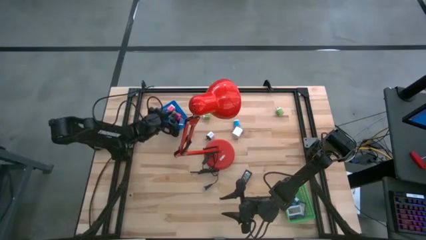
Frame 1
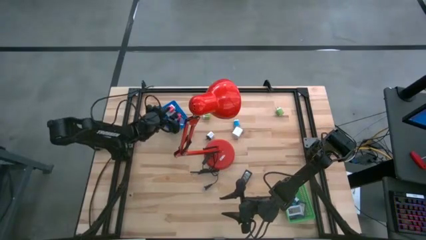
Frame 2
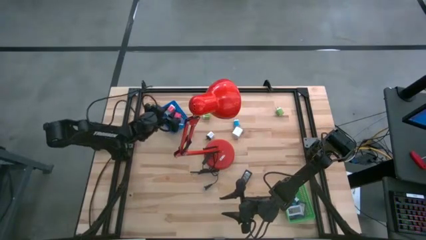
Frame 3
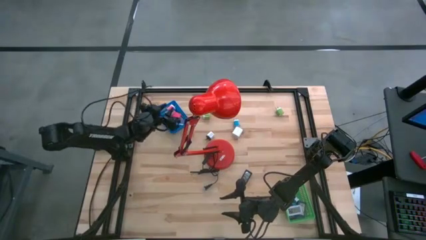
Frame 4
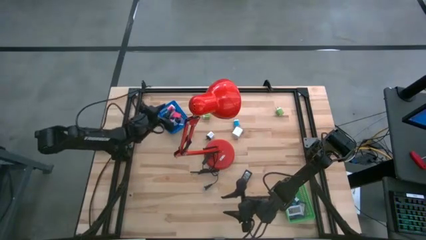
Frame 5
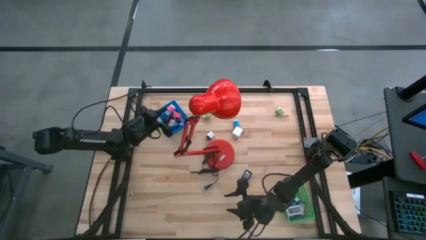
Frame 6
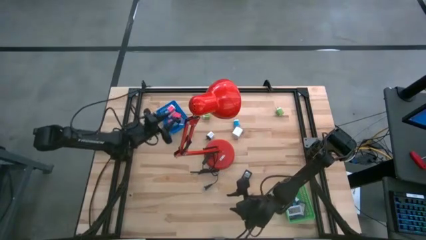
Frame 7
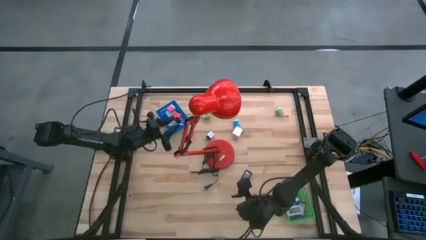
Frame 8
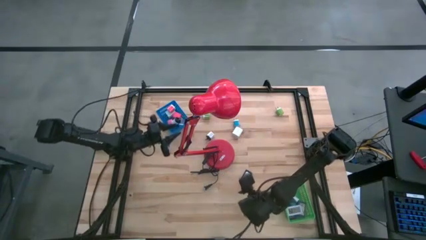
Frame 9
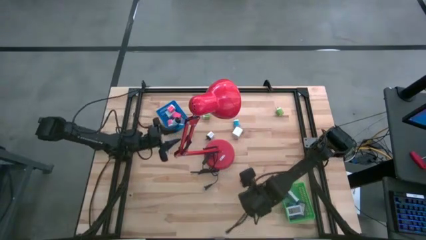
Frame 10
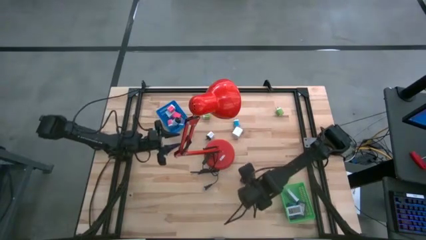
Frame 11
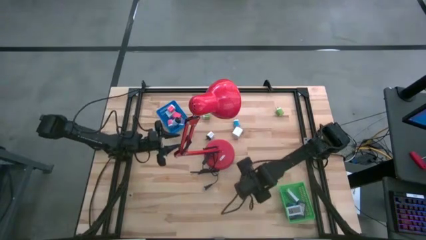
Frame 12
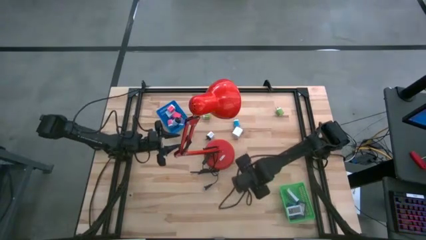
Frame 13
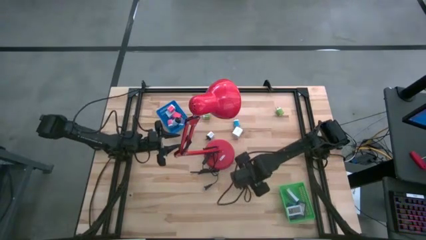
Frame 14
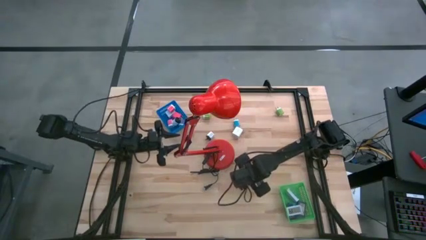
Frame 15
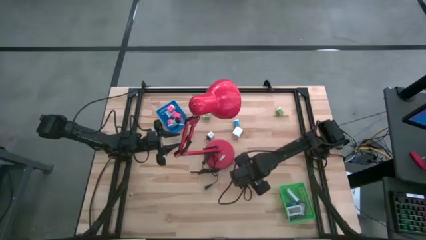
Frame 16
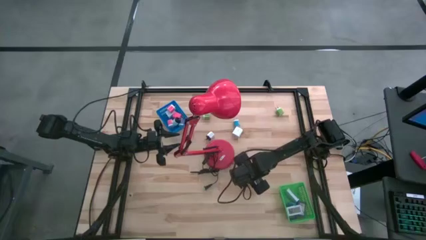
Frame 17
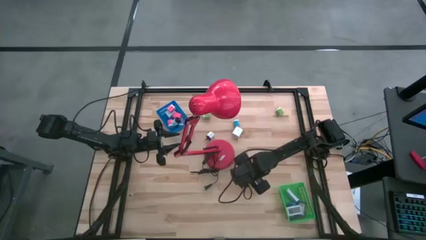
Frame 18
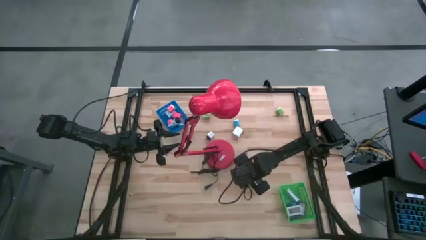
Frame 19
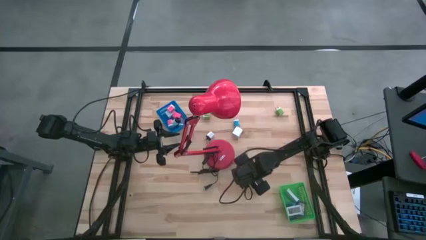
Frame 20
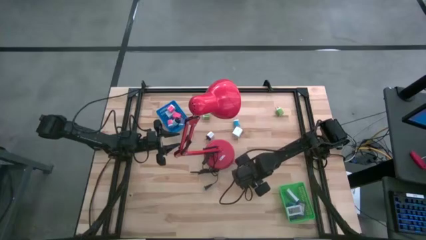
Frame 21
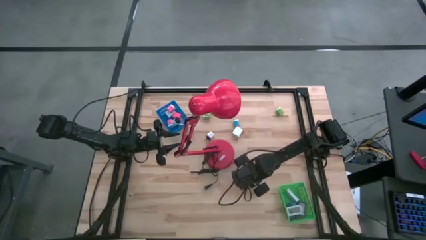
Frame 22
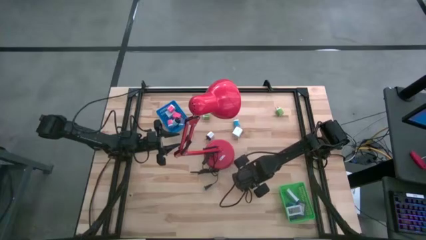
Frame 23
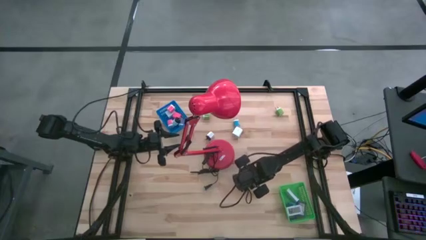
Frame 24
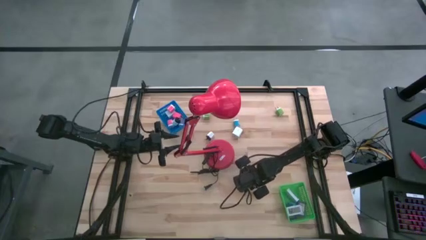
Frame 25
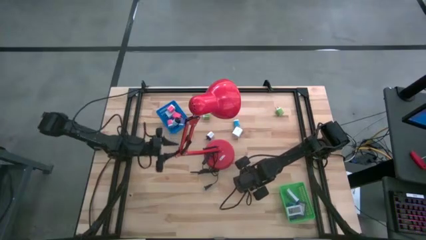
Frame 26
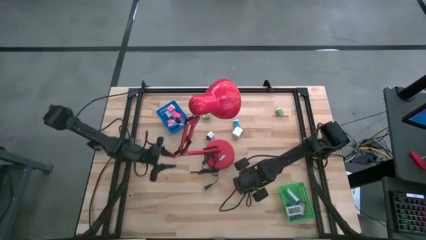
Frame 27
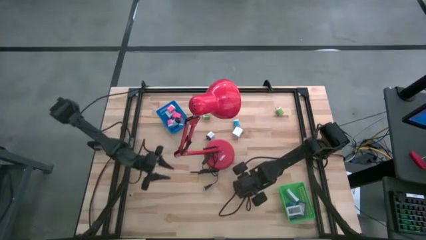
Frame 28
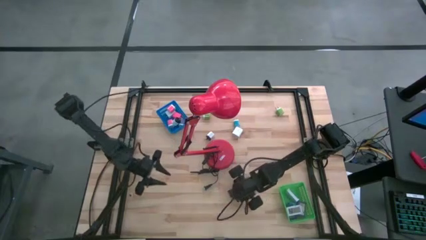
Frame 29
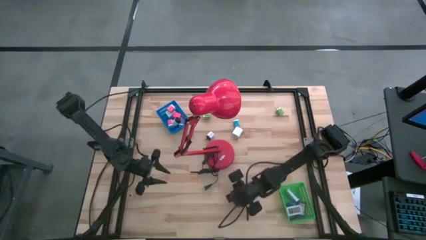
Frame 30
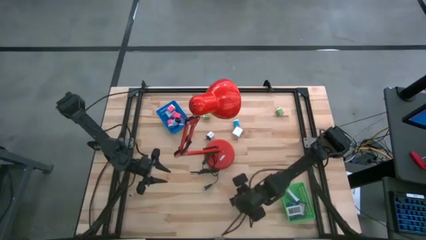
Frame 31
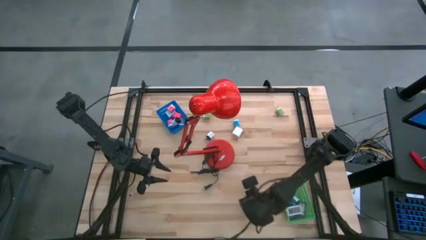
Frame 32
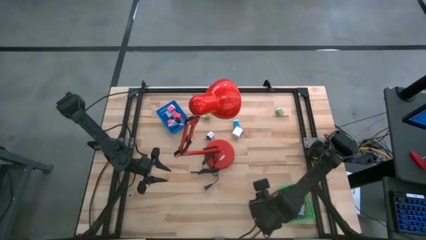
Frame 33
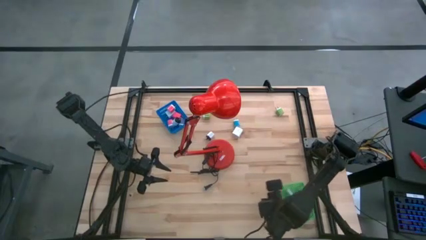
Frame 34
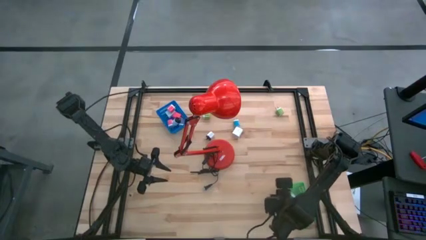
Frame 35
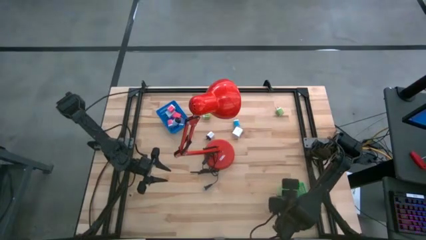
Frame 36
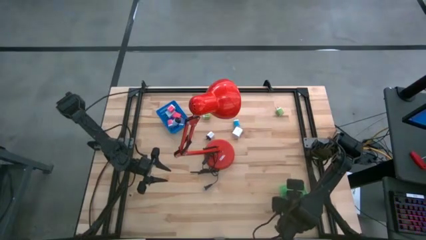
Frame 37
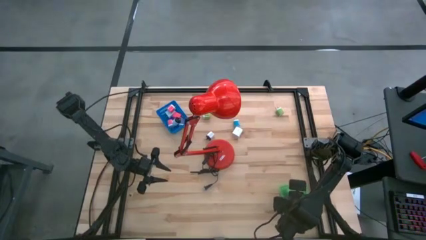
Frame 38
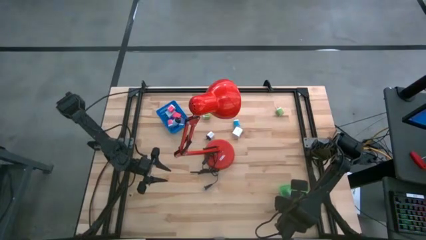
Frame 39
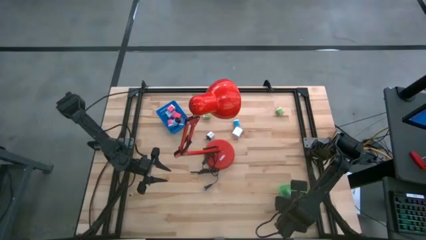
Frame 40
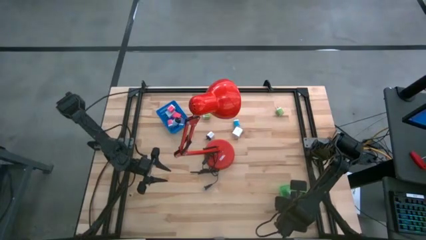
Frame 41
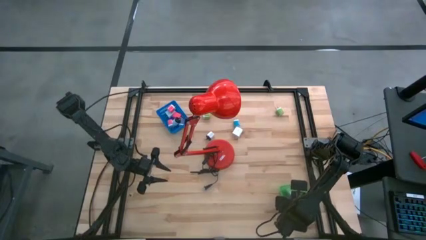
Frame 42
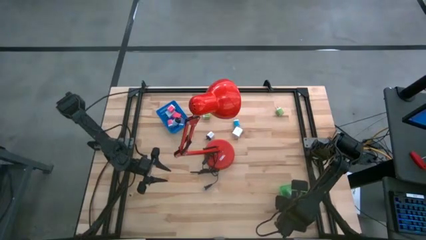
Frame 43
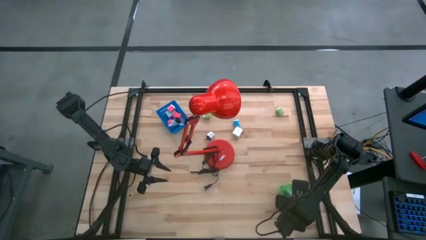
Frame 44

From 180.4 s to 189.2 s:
Task: Pick & Place Office items
Put the black digital clock into the green bin

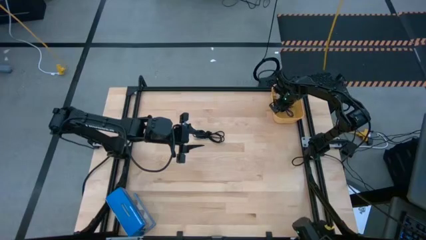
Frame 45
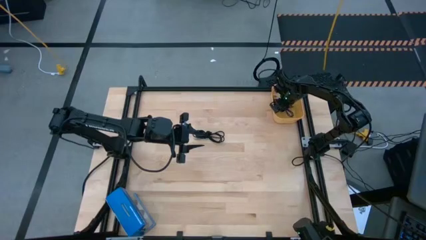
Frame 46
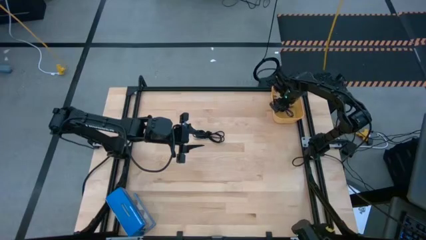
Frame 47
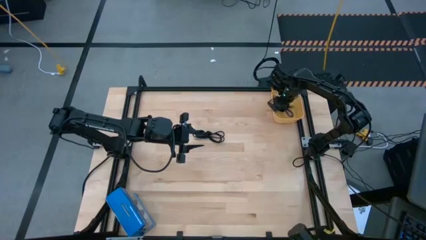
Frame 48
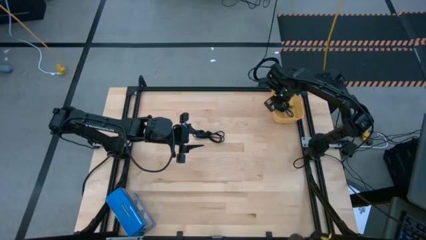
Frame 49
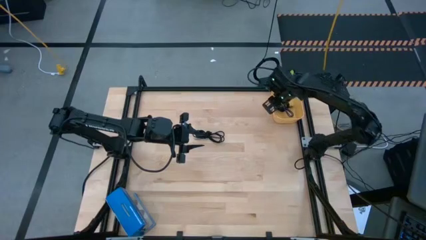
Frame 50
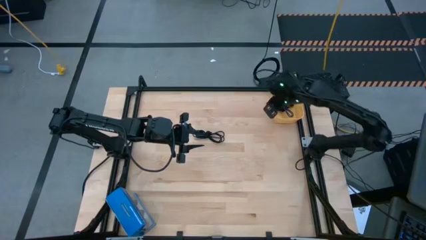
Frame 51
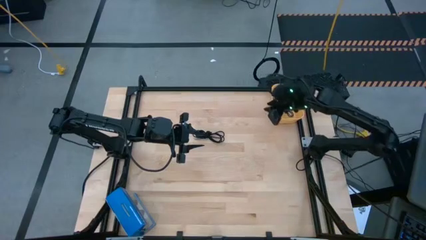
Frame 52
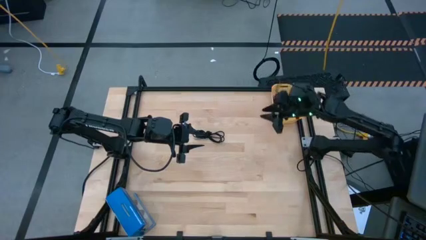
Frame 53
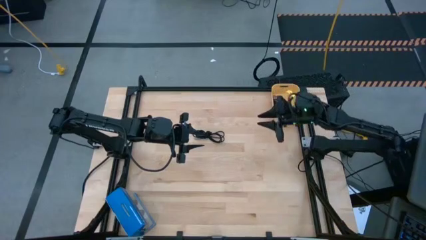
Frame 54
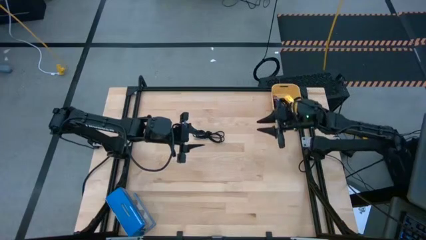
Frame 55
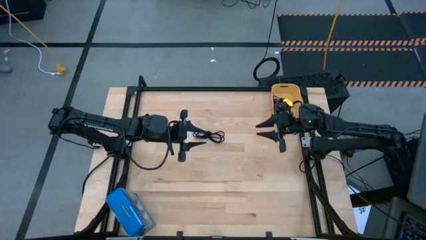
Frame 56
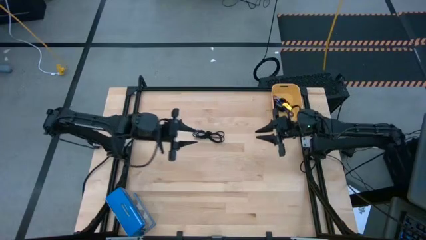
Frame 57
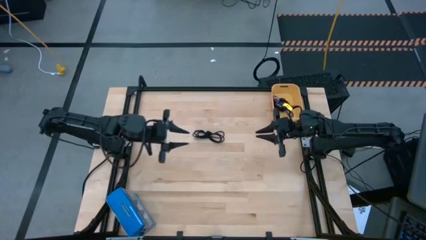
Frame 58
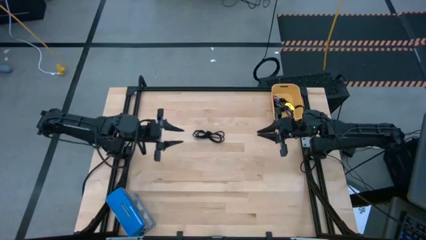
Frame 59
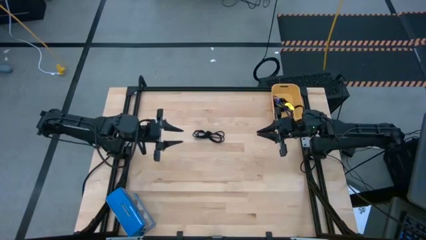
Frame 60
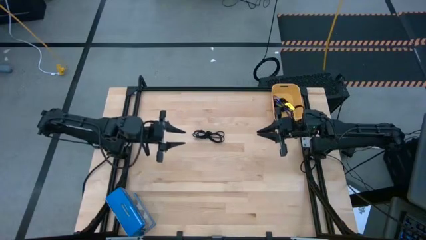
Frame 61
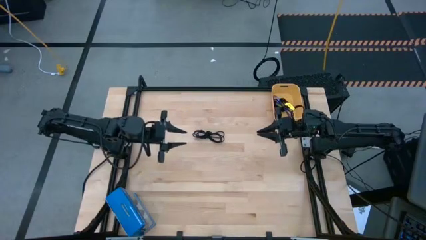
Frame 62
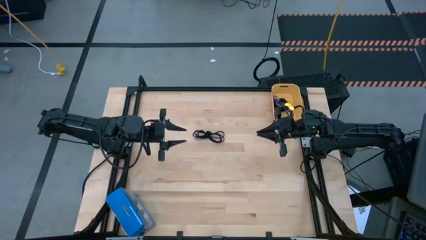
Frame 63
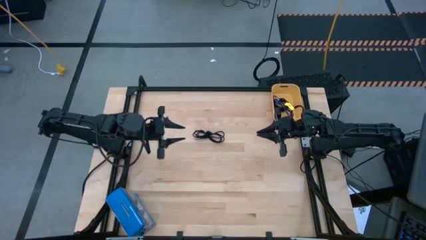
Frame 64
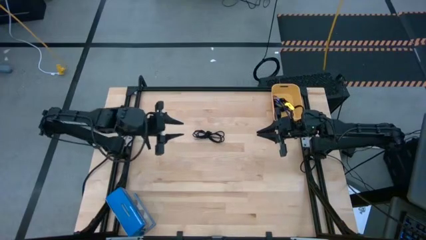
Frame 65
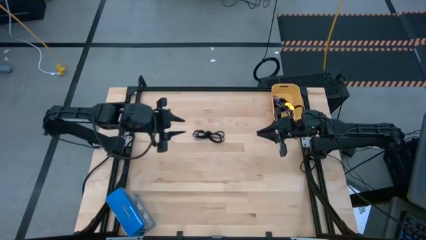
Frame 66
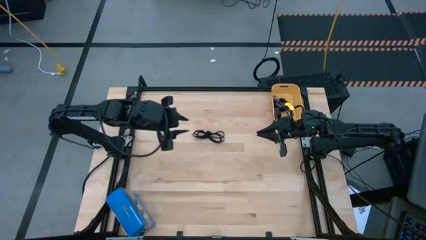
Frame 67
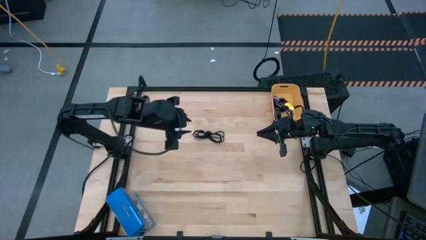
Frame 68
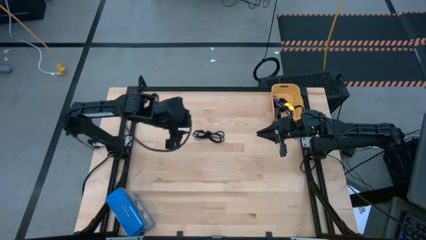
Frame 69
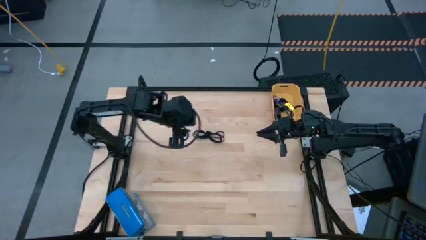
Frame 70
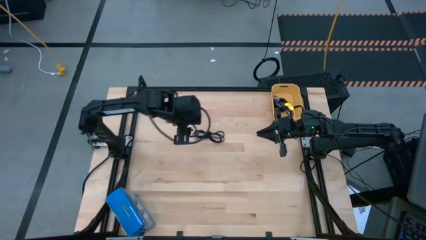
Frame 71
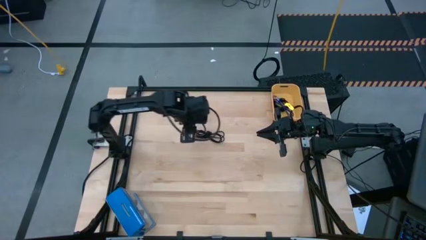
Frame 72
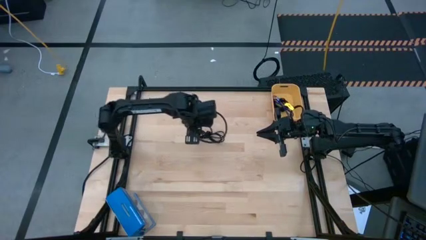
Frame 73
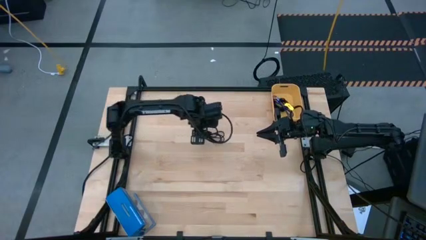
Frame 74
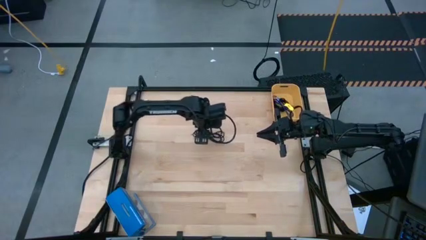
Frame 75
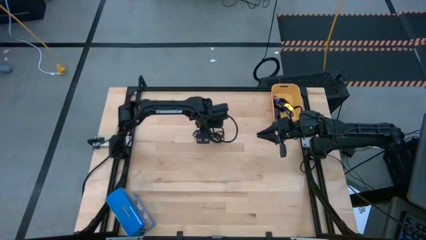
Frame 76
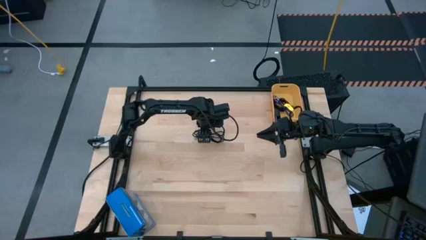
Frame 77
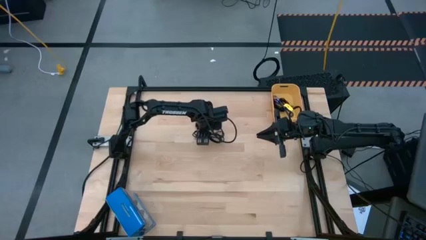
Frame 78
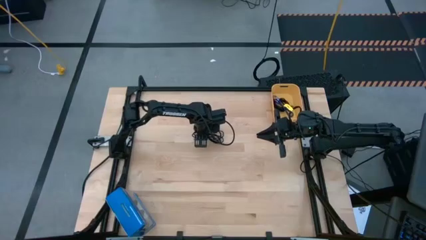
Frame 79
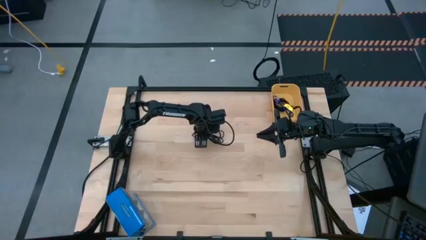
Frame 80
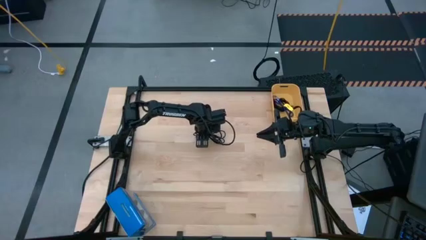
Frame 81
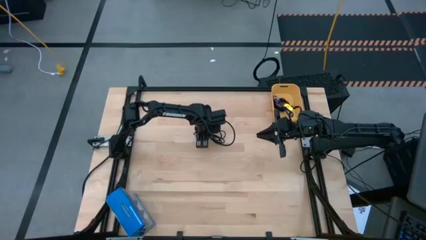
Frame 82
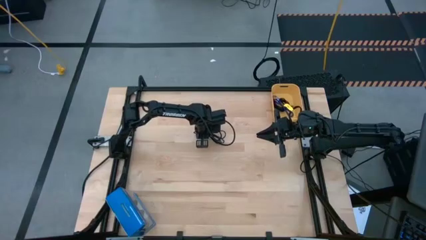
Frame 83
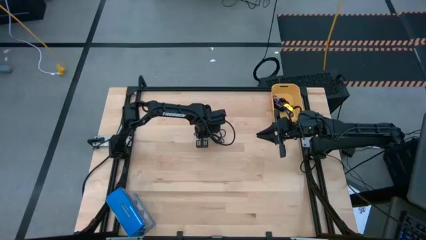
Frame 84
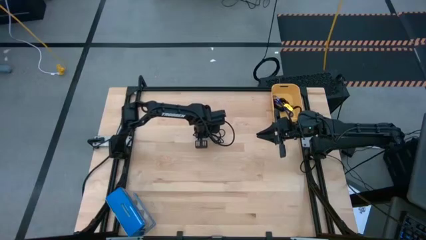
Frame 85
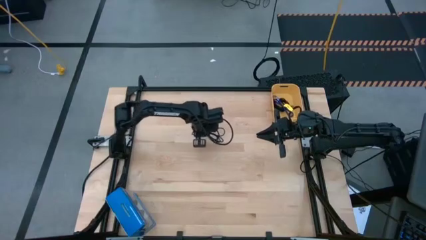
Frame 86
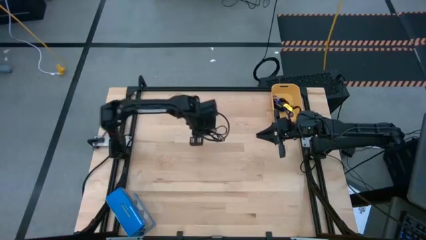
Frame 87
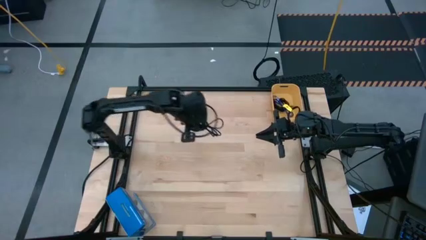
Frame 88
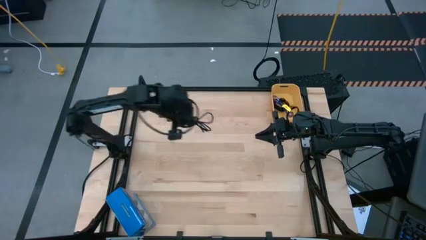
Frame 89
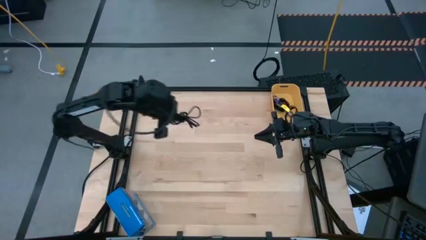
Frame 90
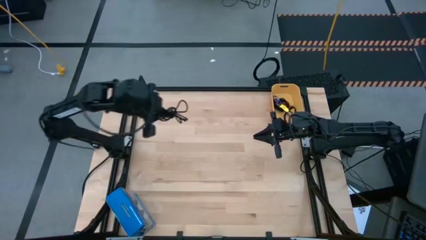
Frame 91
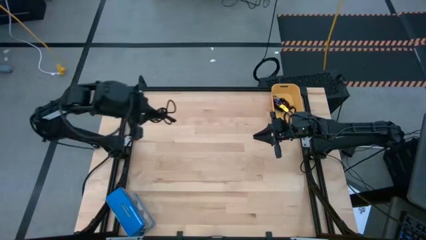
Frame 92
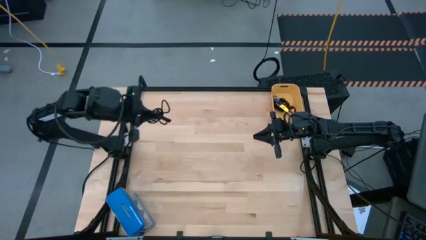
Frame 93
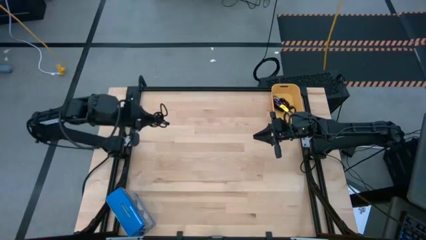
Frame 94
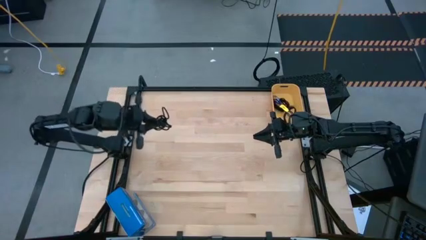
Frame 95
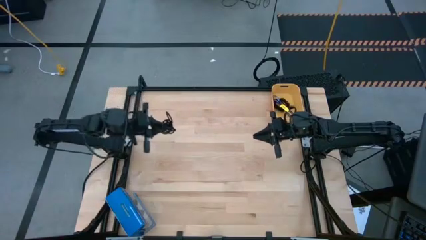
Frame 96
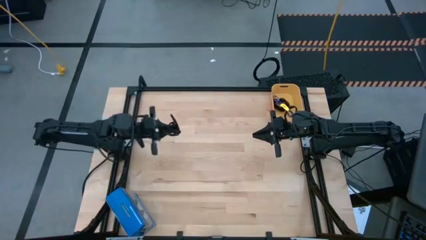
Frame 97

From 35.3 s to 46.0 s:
Task: Pick and place USB-C Cables
Put the black charger cable into the yellow bin
